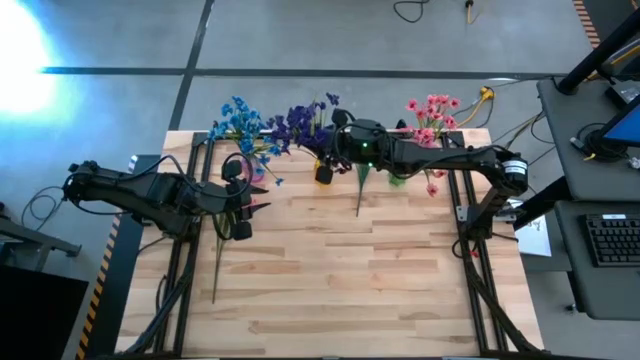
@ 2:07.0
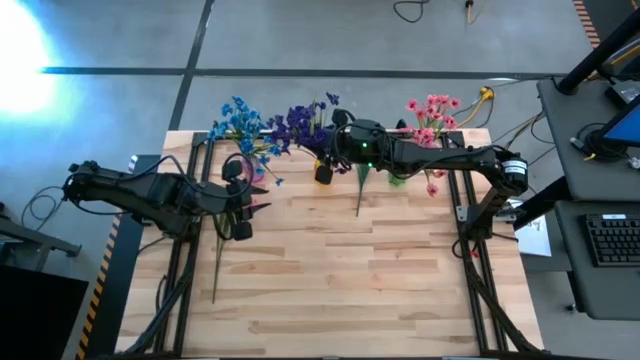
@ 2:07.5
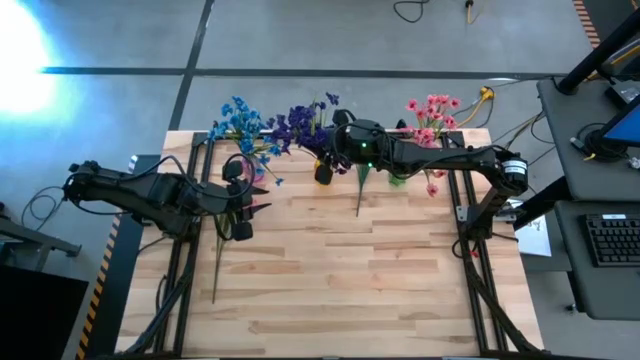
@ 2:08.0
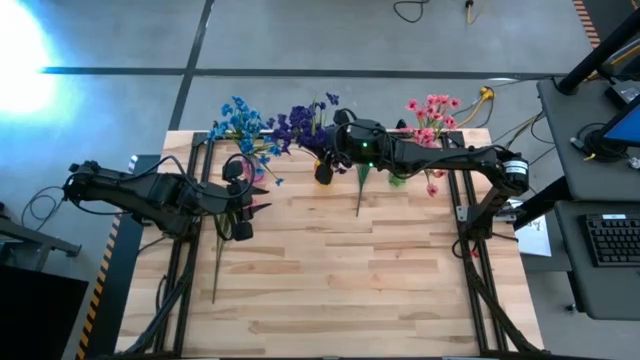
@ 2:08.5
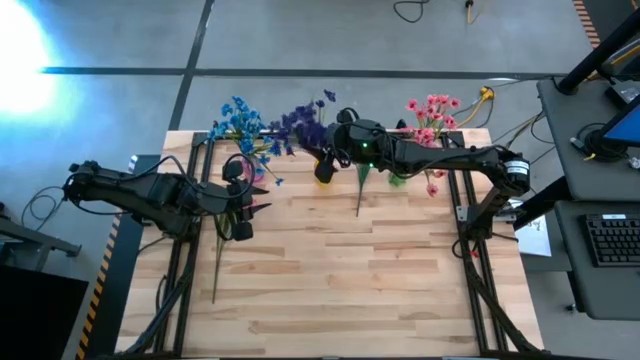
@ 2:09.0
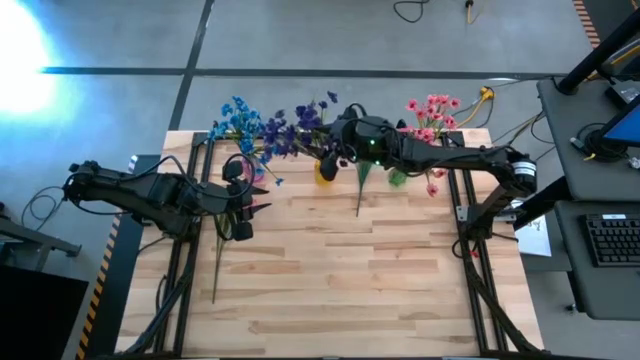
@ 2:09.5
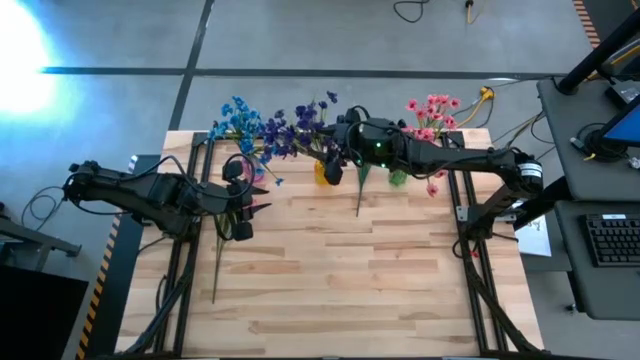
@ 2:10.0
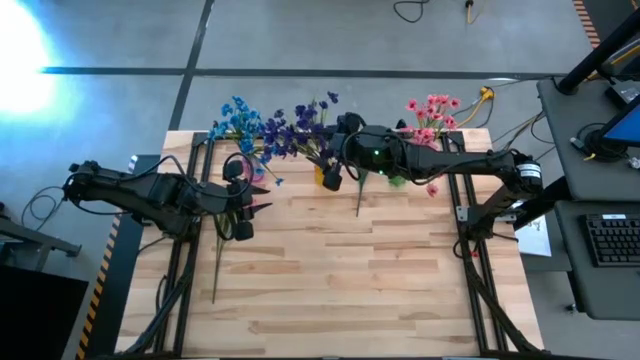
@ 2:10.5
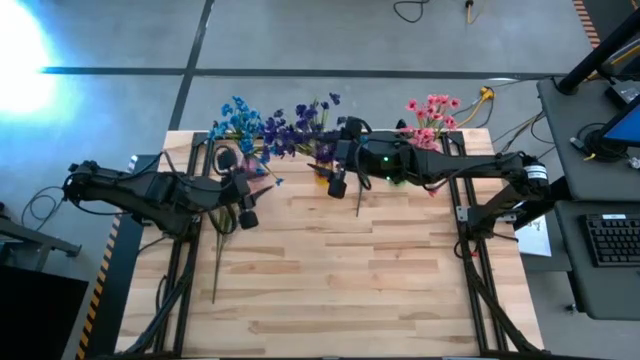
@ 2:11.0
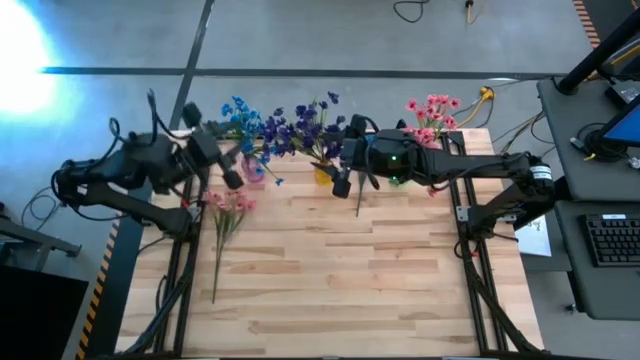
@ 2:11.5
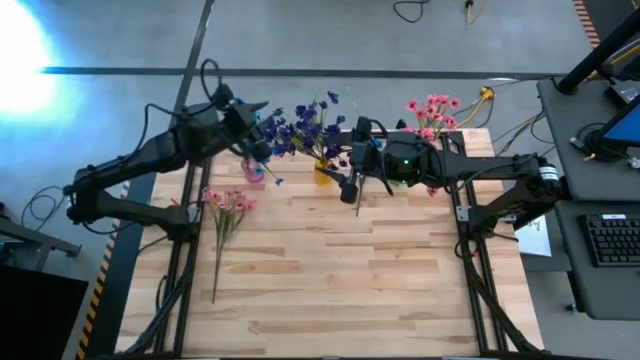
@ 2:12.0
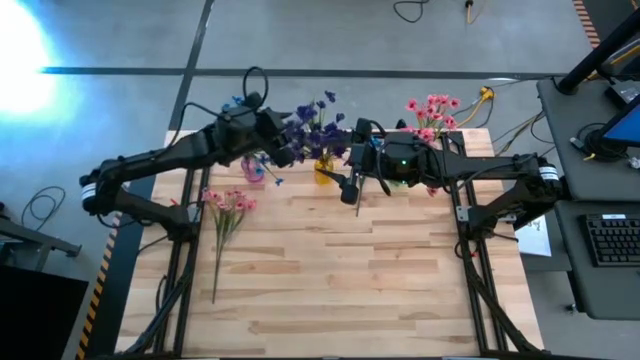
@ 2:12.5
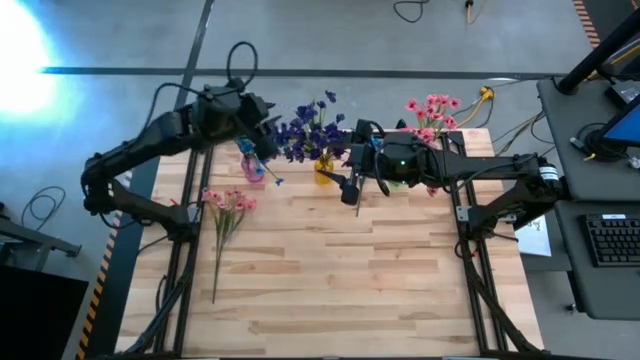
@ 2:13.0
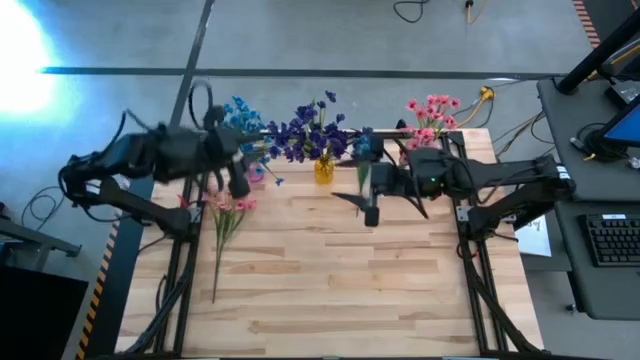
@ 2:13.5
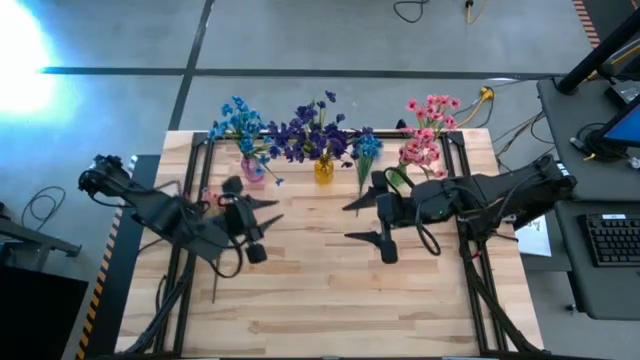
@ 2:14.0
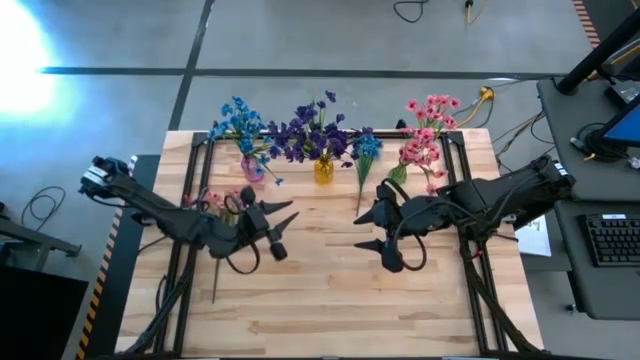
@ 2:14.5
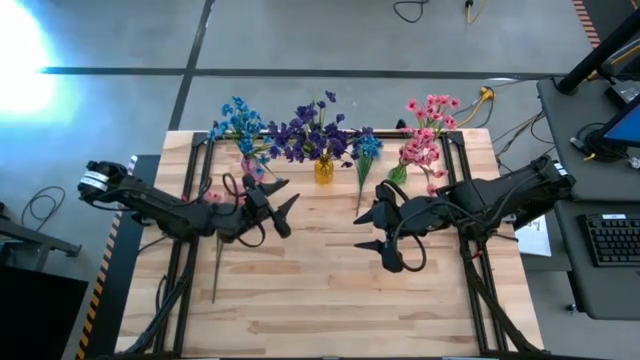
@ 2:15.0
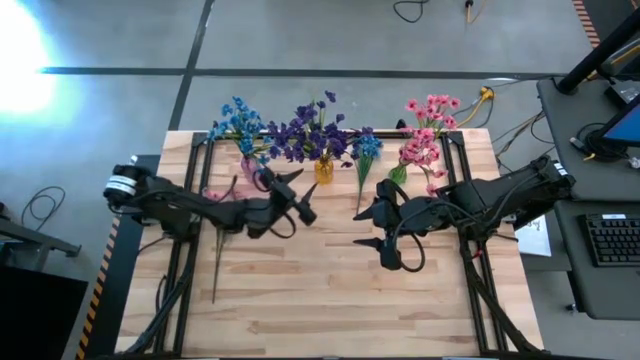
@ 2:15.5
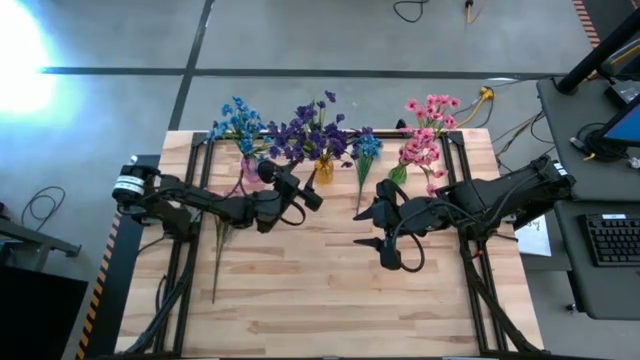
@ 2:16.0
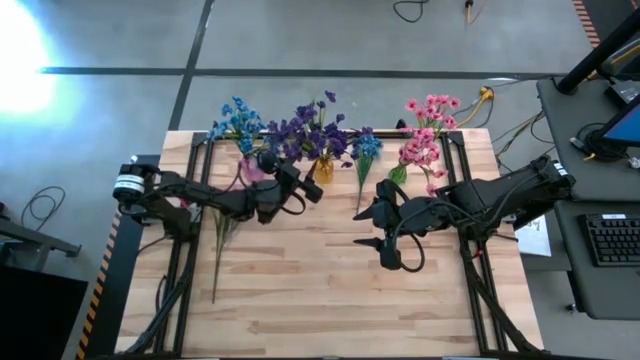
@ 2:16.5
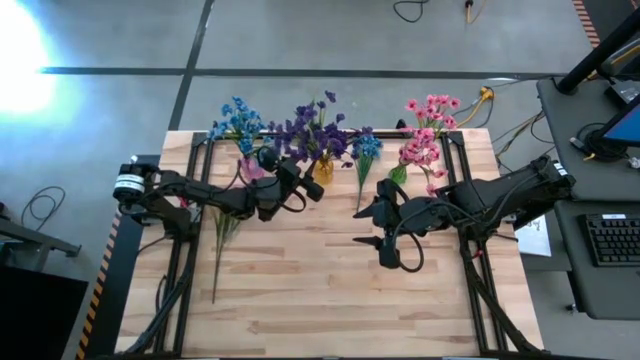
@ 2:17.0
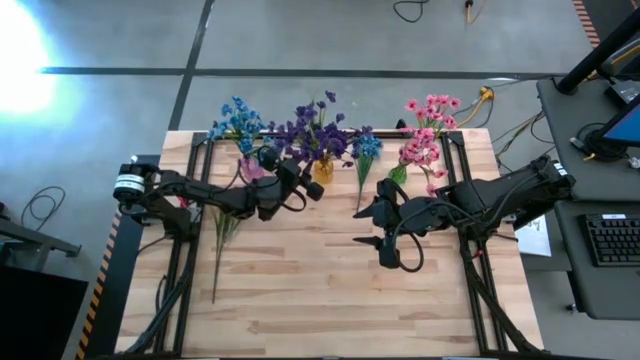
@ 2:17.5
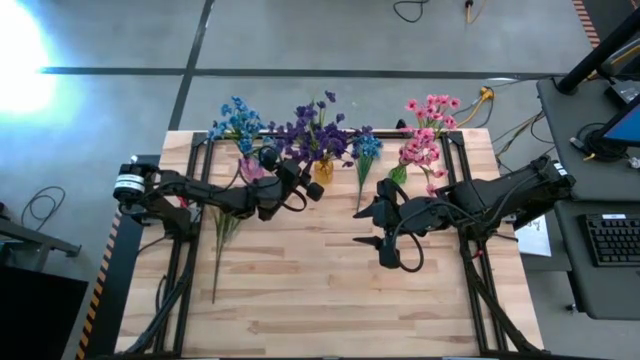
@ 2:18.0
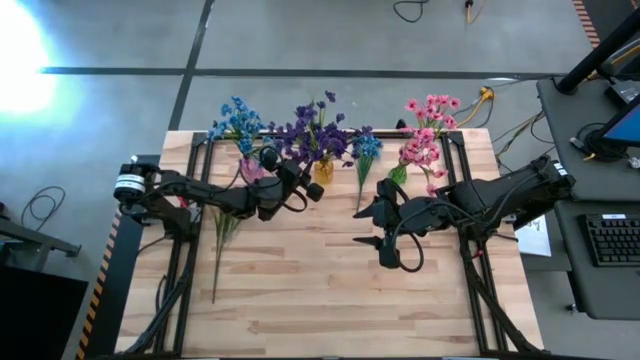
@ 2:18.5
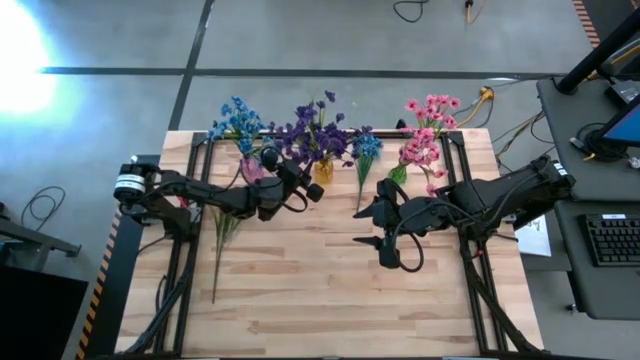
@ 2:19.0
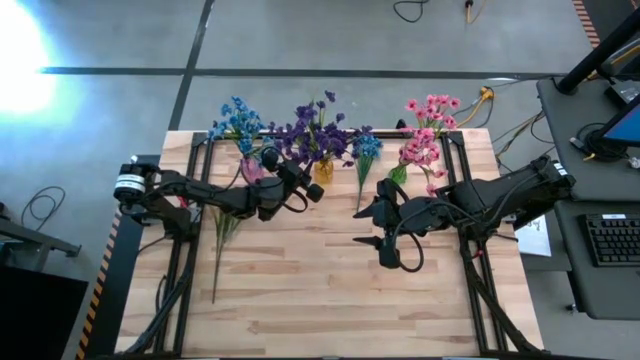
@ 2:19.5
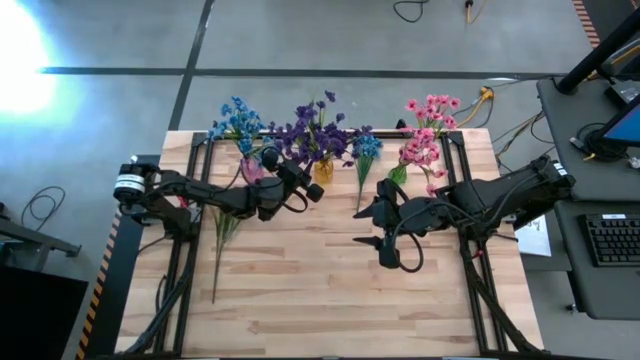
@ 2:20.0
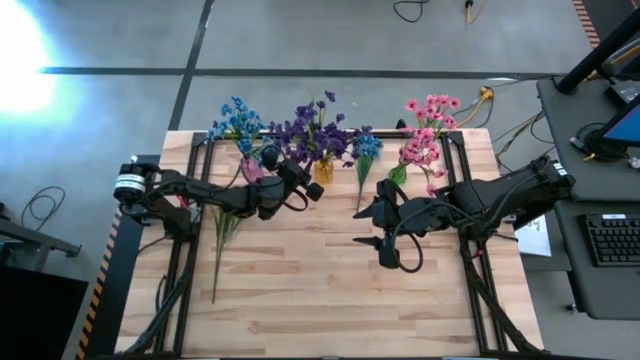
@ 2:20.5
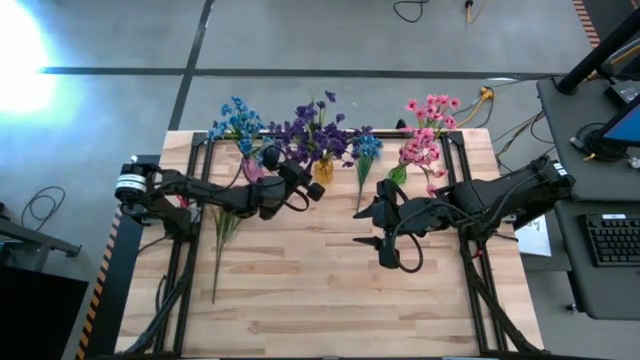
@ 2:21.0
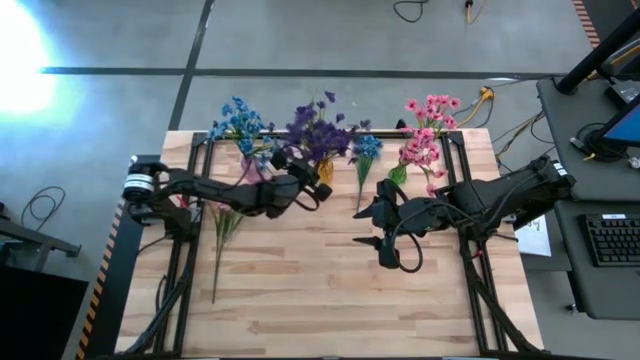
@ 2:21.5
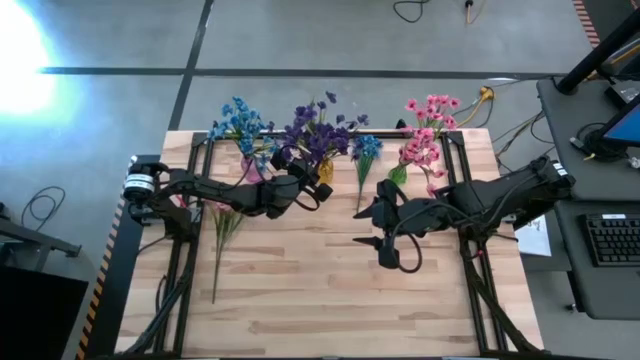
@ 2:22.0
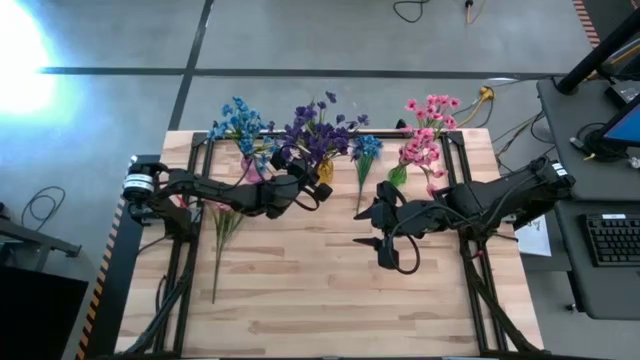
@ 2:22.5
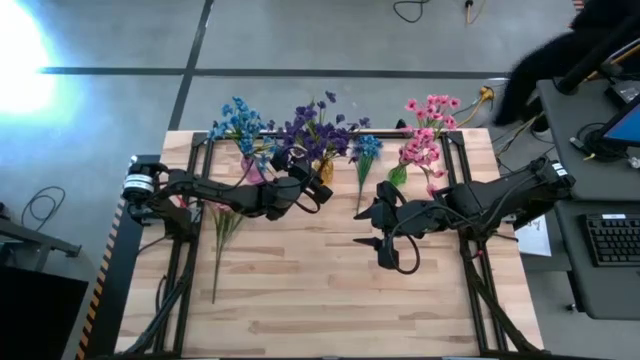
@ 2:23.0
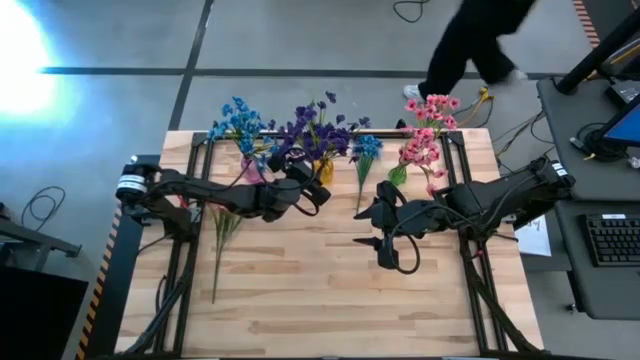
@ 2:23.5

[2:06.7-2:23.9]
Task: Sort flowers into vase by color
Put the violet flowers into the yellow vase

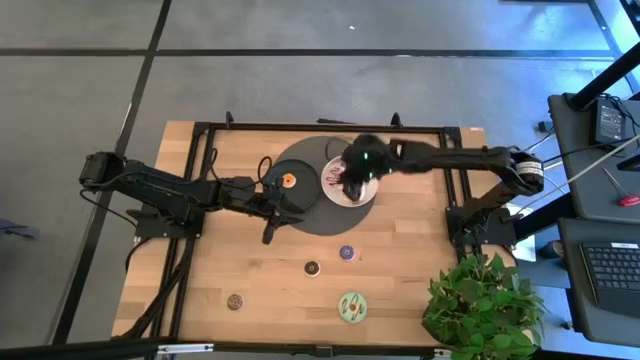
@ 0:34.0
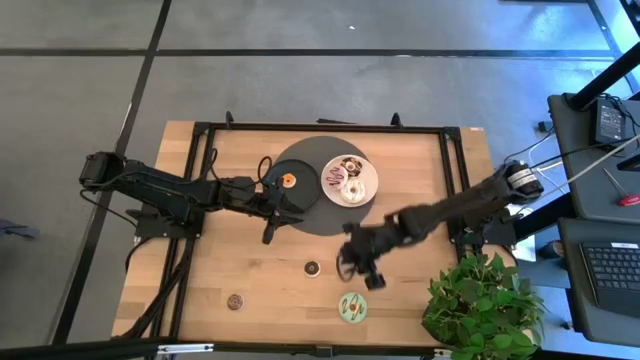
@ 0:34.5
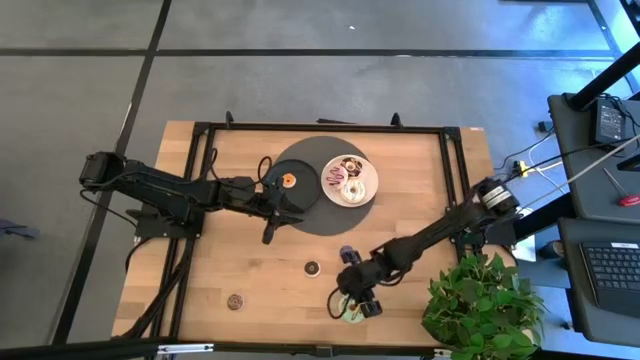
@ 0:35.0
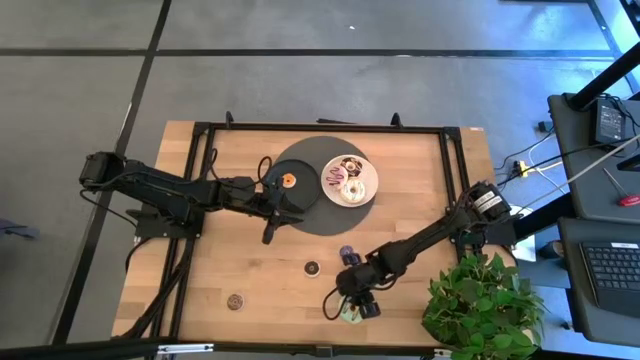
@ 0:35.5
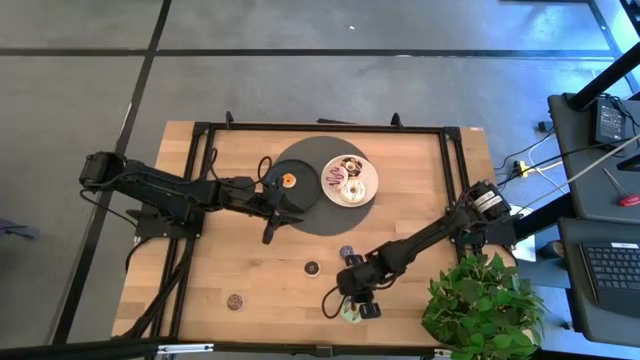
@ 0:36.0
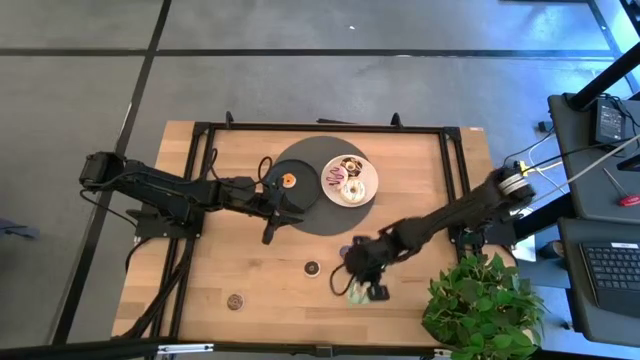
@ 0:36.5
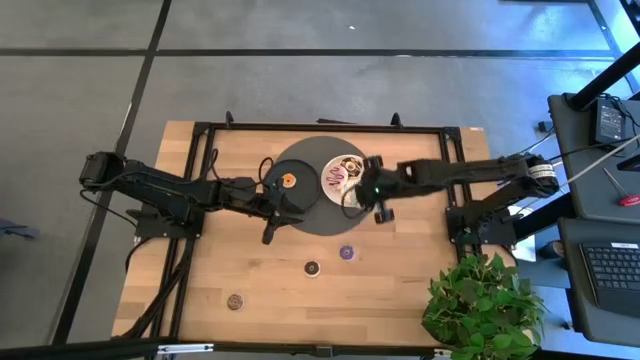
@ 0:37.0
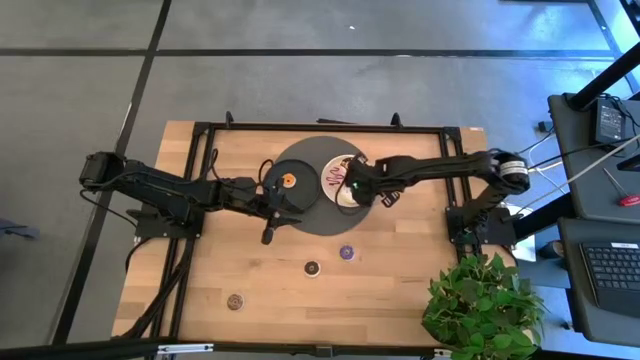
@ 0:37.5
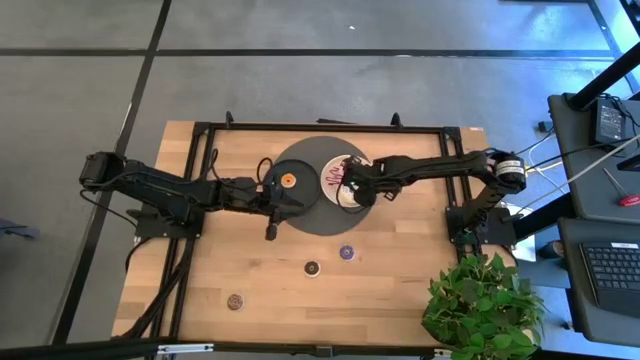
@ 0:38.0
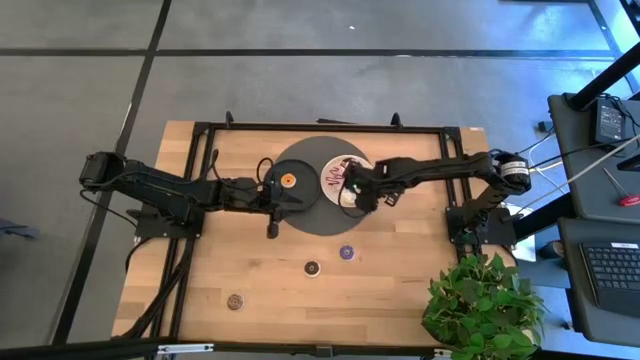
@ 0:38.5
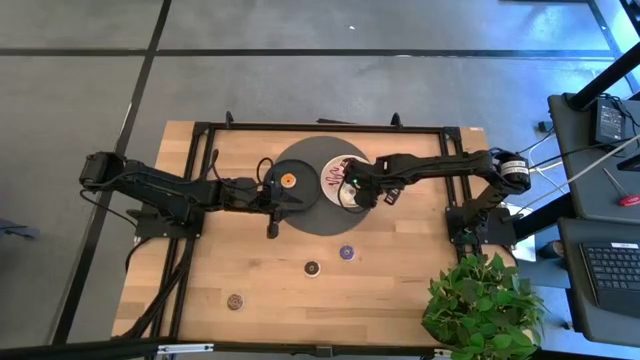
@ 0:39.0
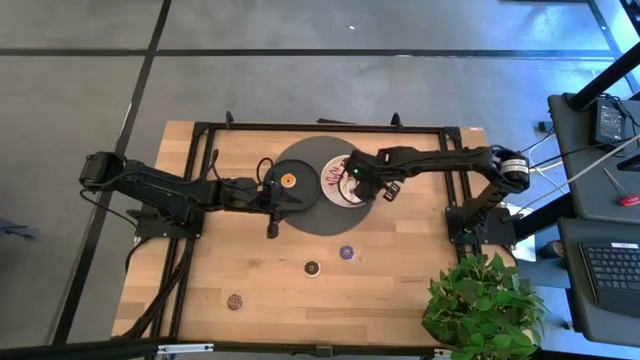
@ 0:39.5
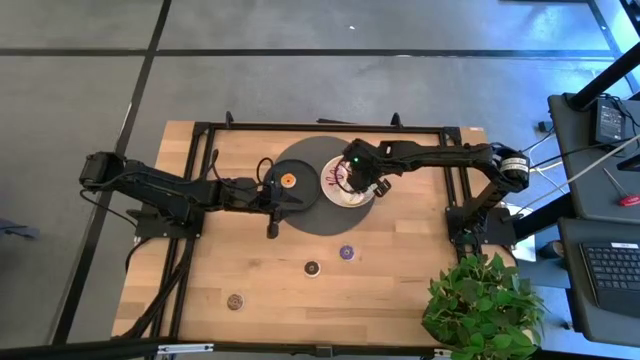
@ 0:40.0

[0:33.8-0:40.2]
Task: Pick & Place donuts
Put the light blue donut on the white plate
